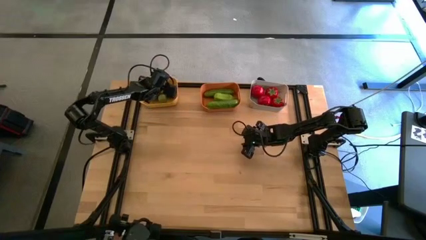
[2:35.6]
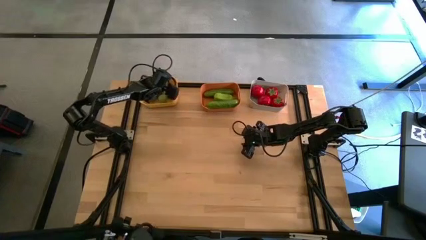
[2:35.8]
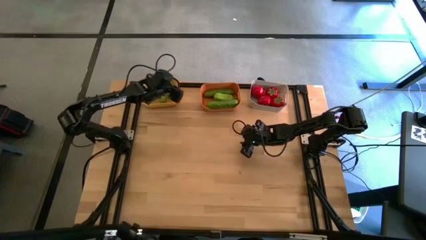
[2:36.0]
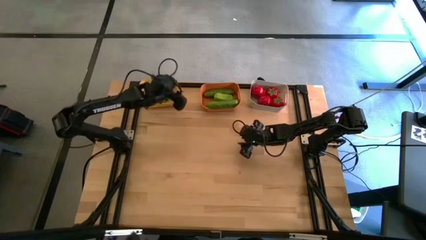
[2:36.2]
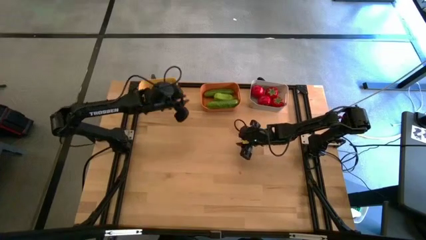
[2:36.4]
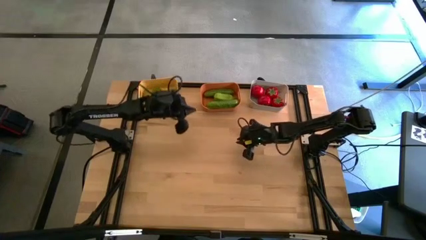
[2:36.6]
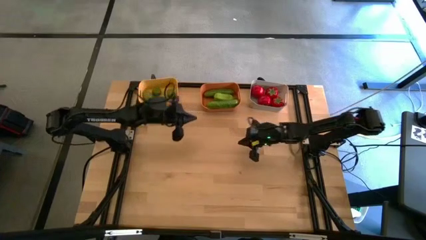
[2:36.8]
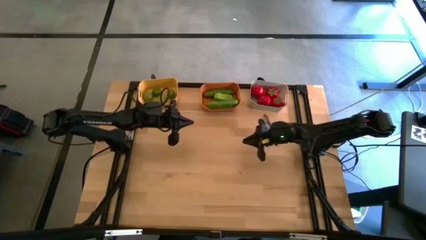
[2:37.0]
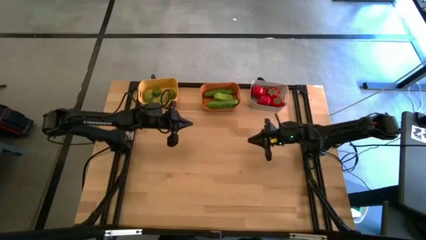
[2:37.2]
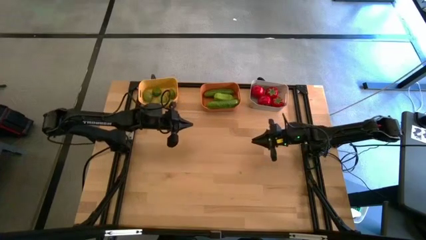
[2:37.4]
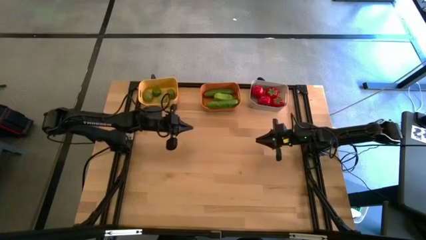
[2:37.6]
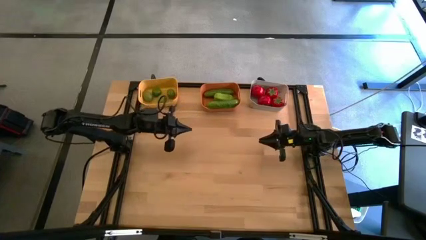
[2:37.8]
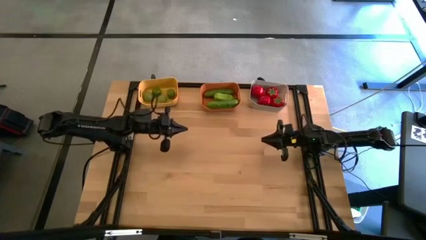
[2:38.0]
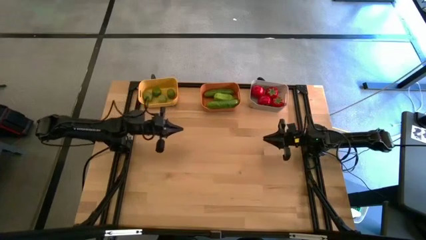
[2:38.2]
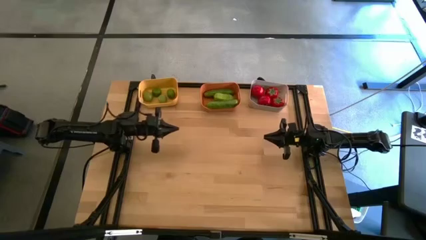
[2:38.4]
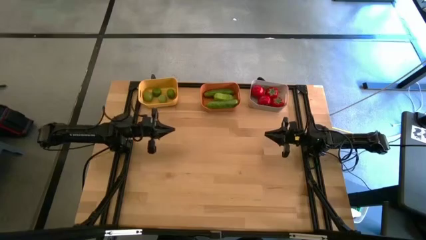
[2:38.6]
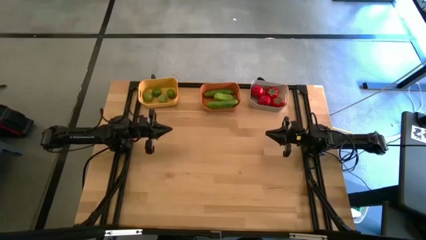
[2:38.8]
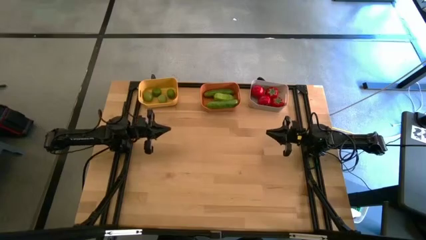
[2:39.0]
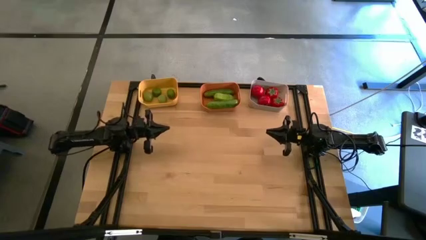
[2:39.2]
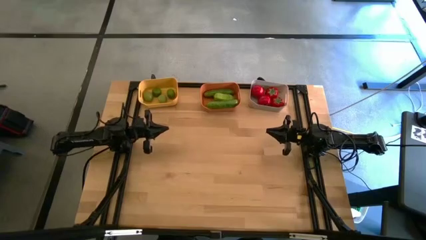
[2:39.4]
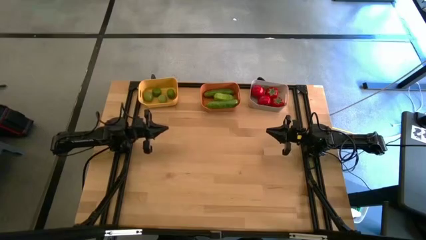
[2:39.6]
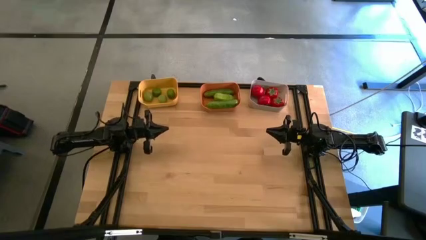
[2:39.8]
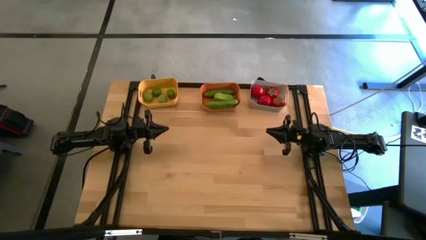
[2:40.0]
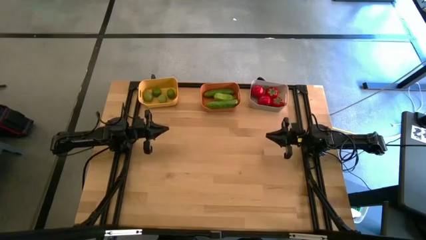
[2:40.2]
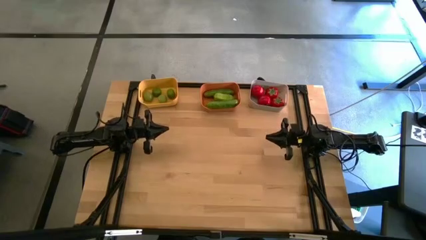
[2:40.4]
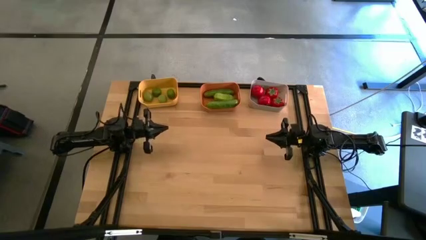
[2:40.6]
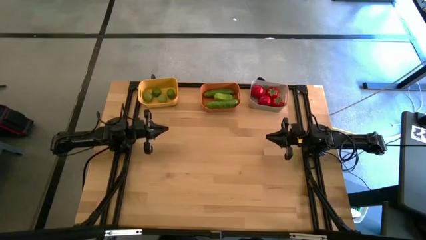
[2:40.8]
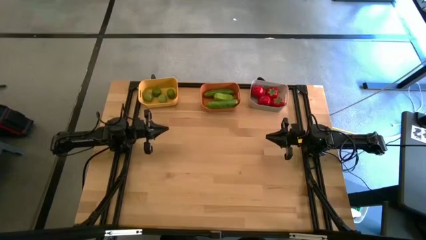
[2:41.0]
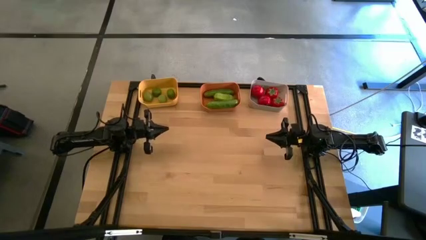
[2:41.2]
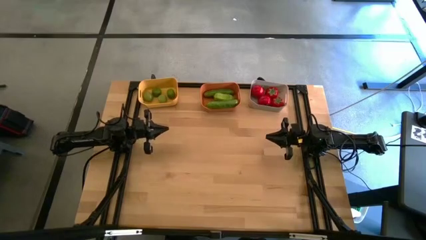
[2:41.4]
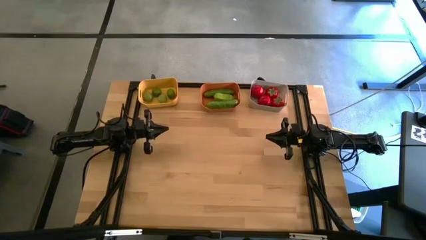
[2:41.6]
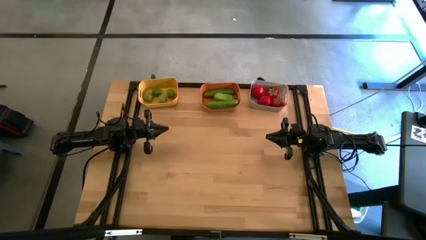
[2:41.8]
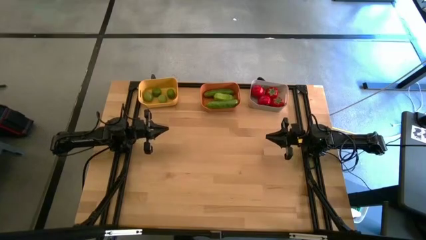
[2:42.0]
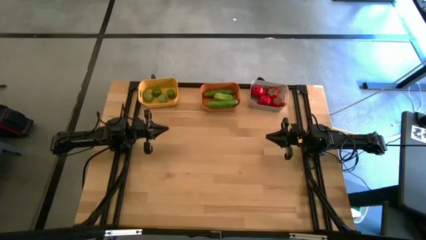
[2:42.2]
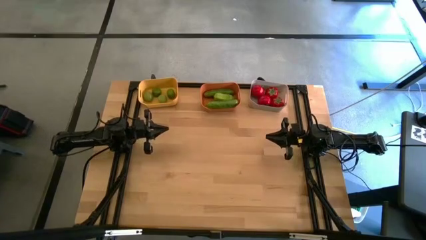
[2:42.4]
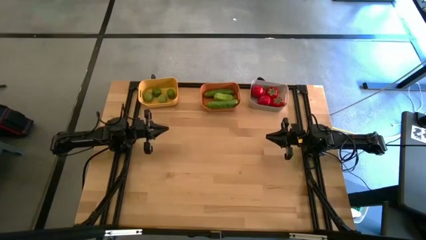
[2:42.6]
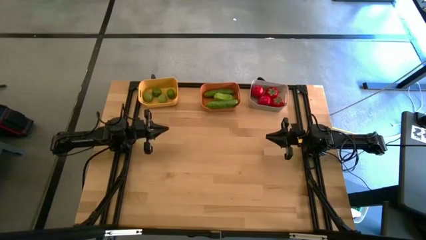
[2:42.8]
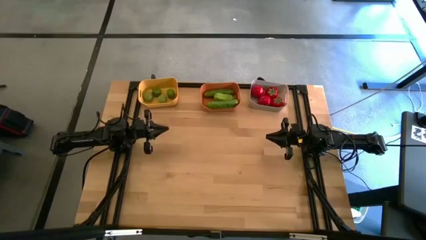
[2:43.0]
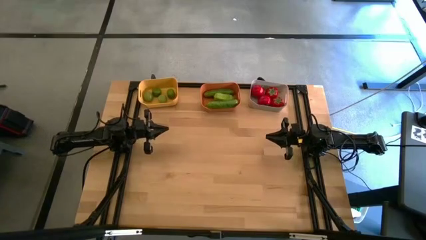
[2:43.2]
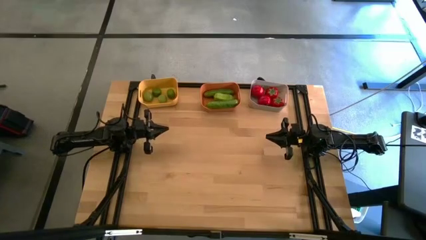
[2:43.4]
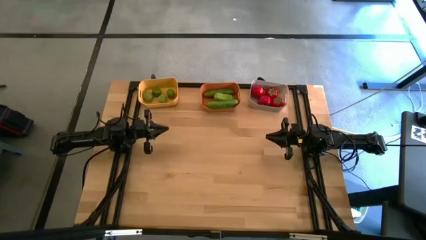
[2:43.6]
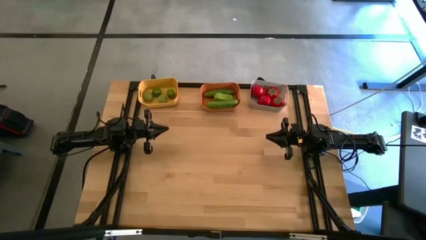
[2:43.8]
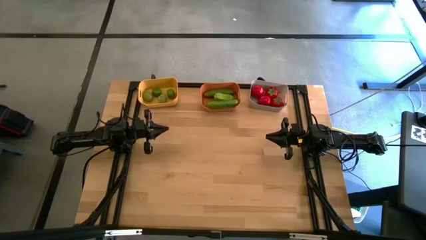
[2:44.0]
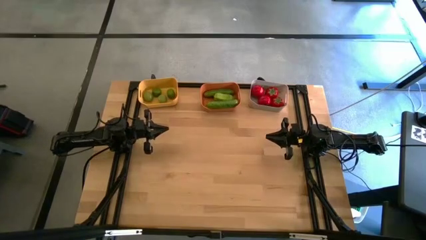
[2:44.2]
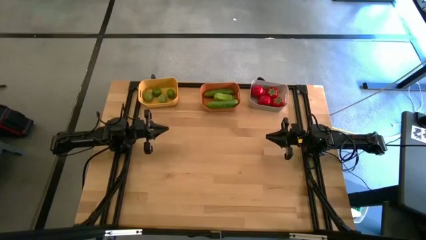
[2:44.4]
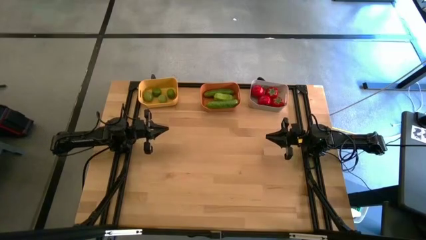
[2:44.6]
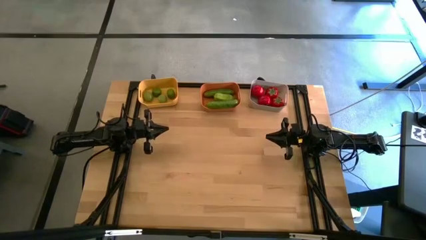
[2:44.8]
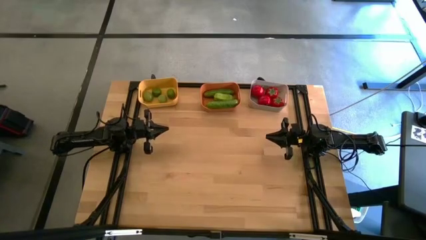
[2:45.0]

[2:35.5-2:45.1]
Task: Sort produce into baskets
Return to Home Position

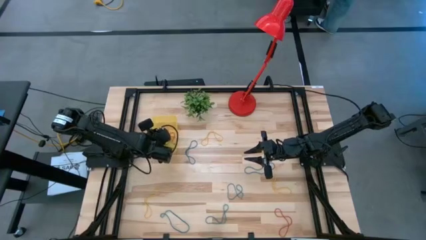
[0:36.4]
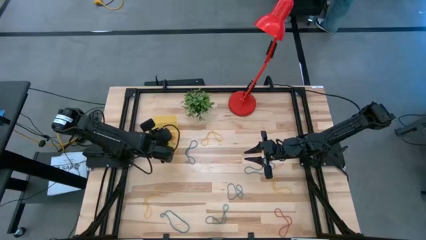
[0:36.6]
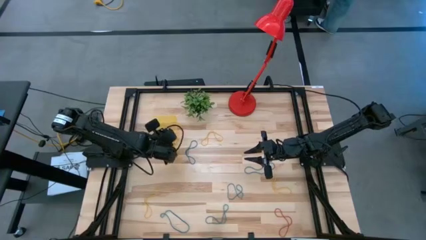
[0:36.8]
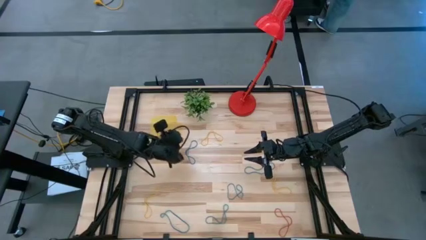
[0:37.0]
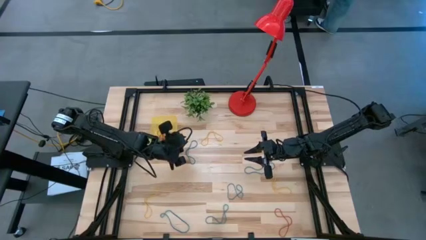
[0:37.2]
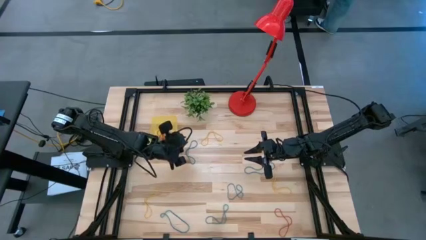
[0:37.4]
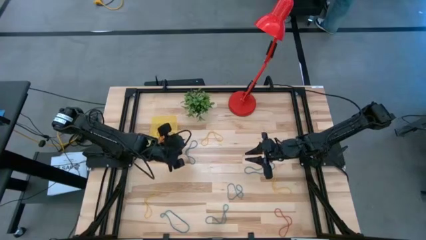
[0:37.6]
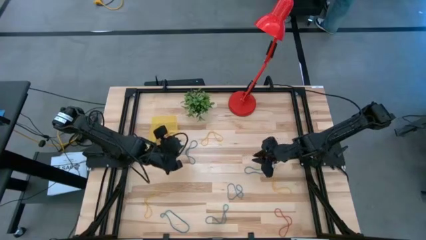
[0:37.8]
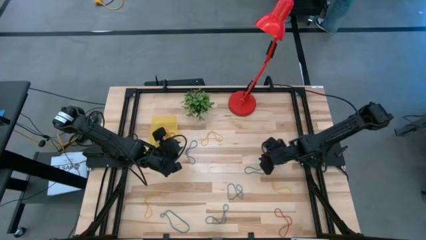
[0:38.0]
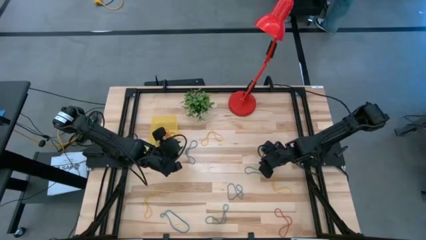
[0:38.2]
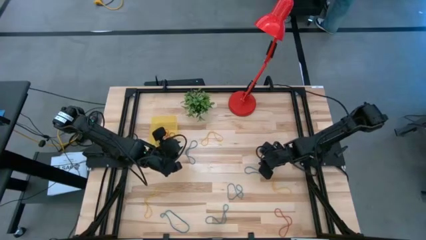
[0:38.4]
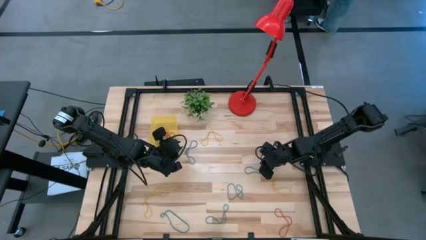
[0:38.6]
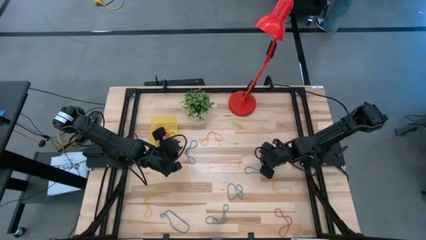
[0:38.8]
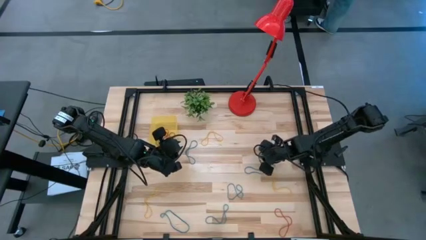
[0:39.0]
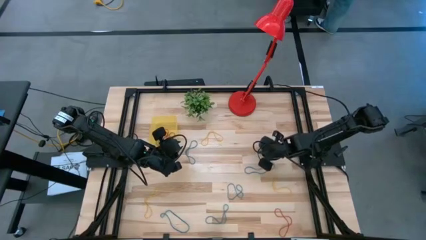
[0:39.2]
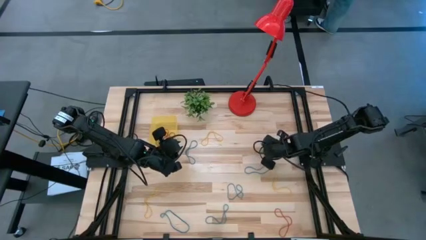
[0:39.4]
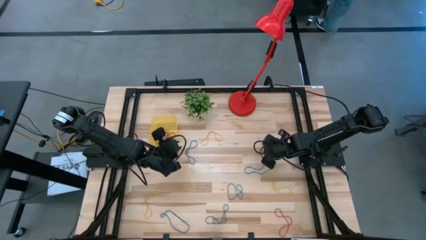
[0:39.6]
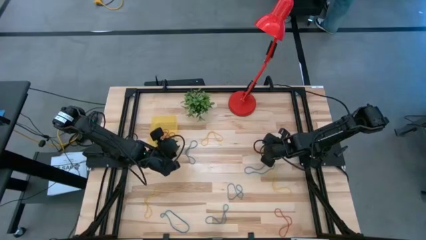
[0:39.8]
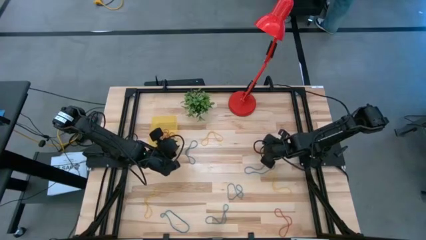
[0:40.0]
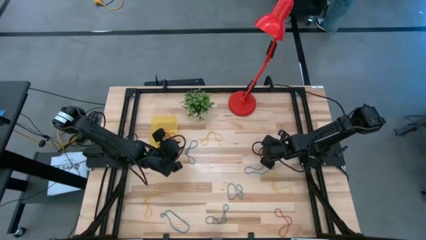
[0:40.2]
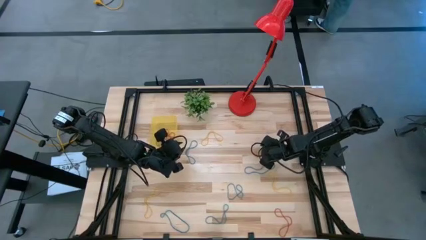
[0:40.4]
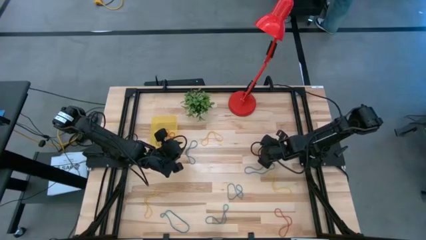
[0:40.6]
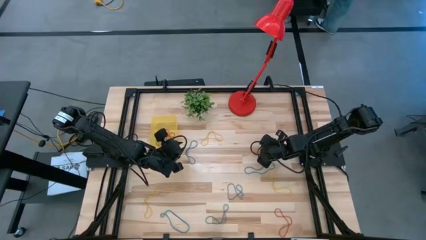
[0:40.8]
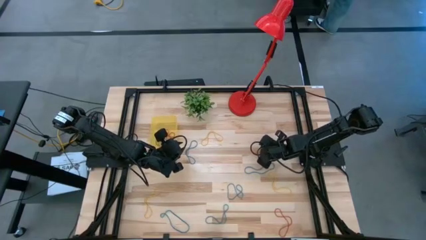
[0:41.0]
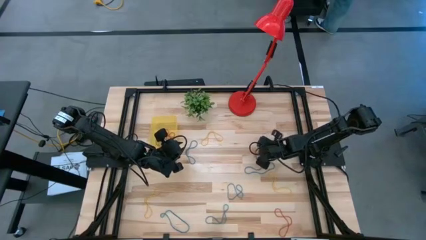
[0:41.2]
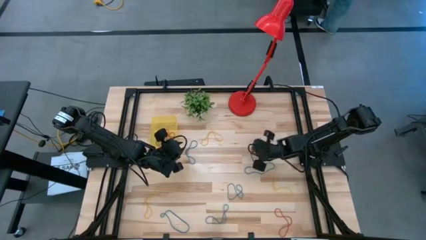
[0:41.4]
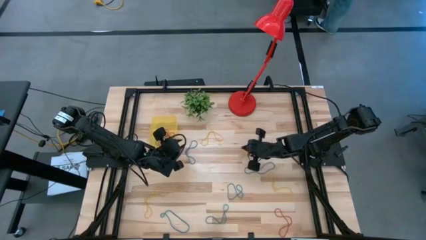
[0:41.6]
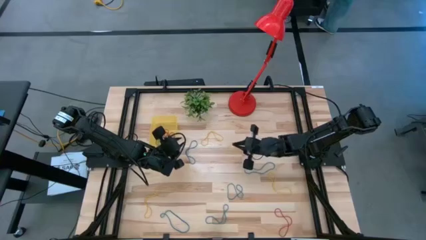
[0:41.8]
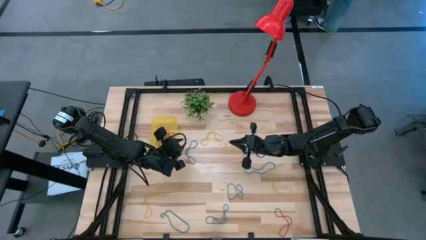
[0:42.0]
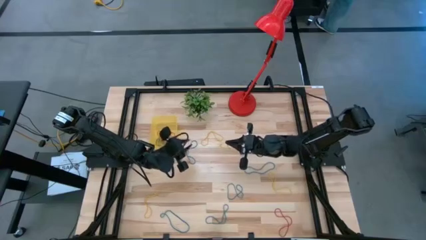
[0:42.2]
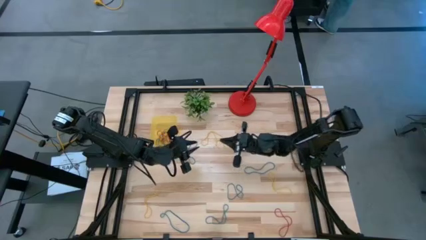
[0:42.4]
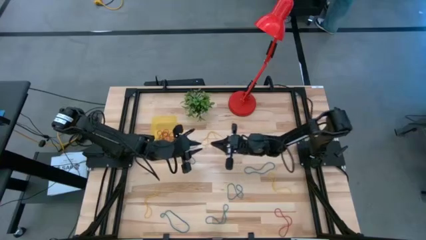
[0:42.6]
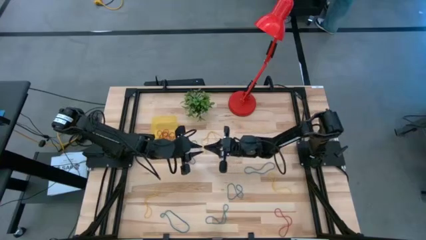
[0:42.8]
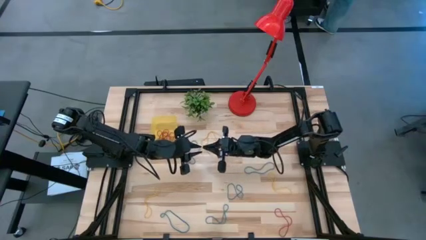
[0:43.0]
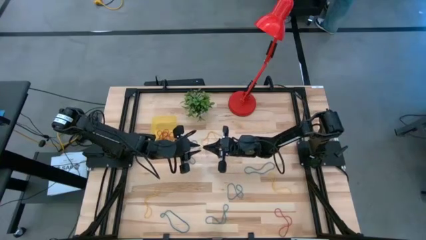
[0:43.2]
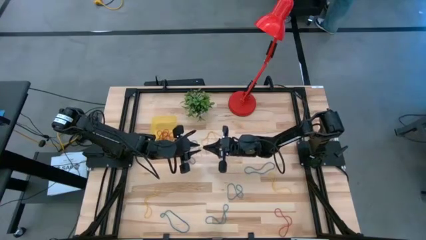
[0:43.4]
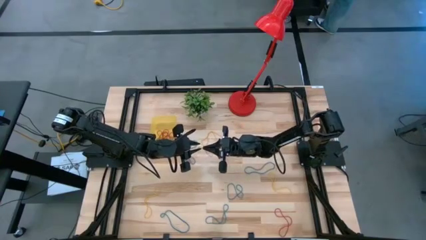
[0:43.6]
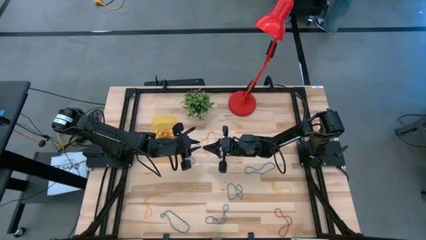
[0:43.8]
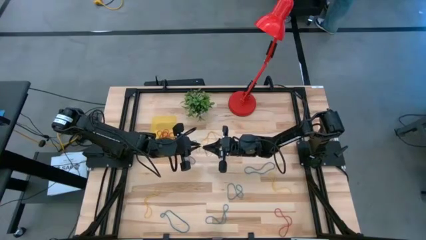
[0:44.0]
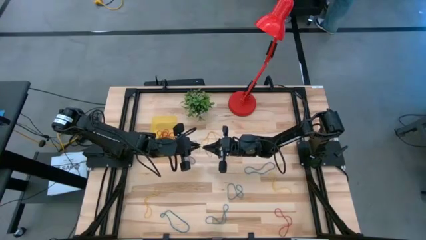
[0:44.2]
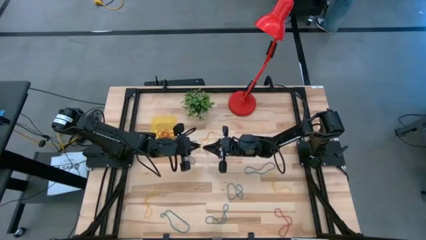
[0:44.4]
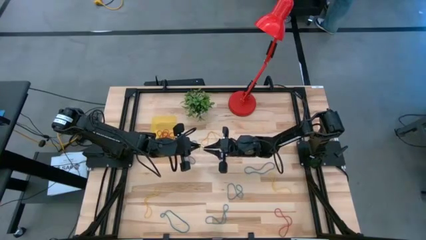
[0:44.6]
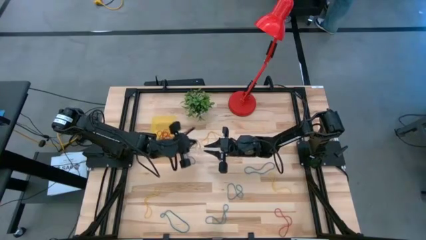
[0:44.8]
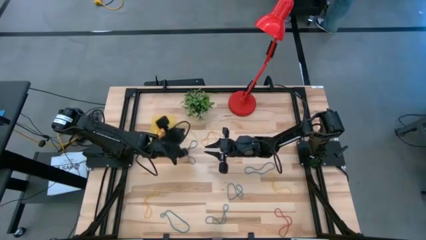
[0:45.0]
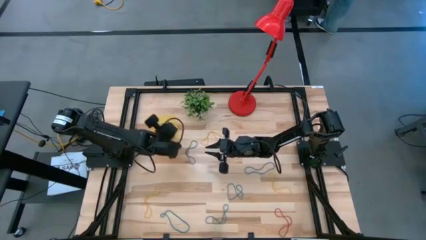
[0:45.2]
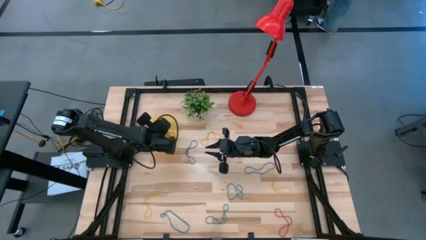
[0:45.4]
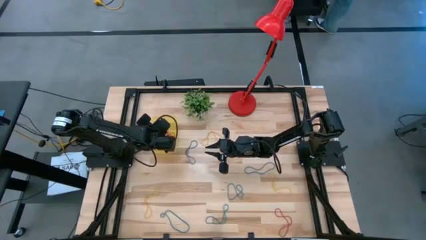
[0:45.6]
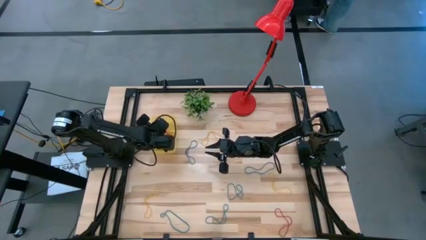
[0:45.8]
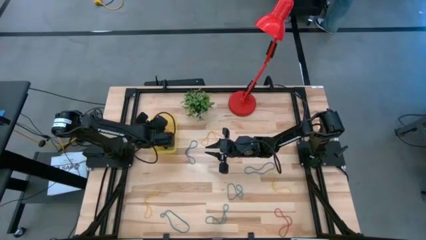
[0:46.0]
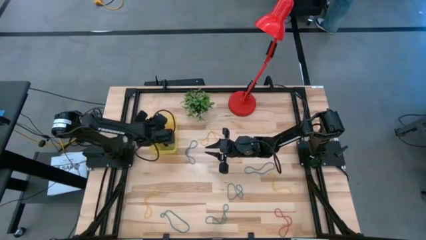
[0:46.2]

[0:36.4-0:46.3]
Task: Pick and place items into bin
Put the yellow rubber band into the yellow bin
